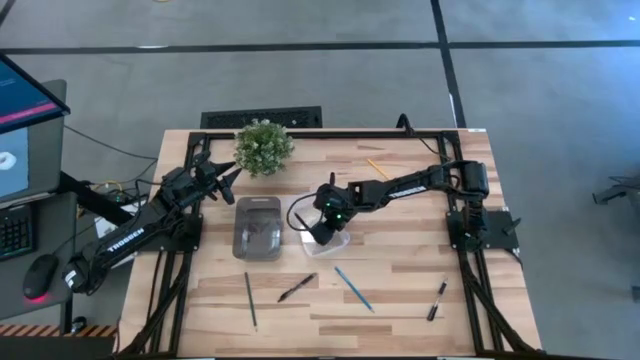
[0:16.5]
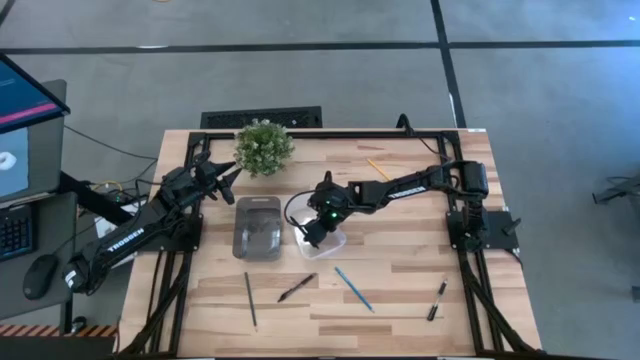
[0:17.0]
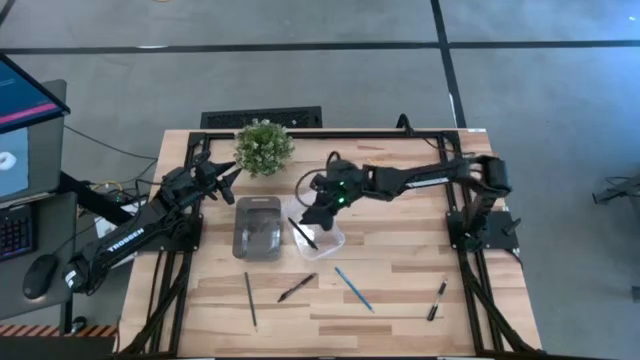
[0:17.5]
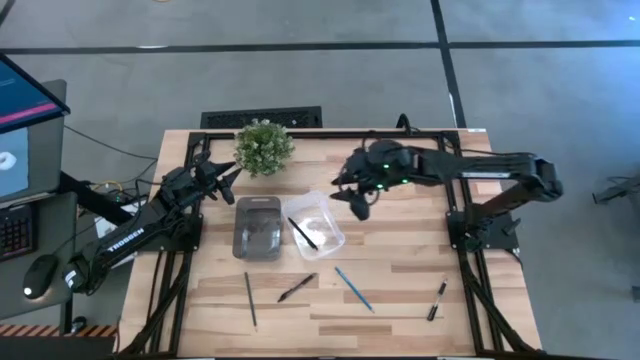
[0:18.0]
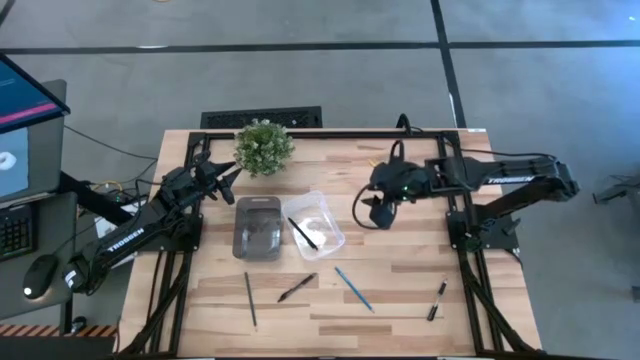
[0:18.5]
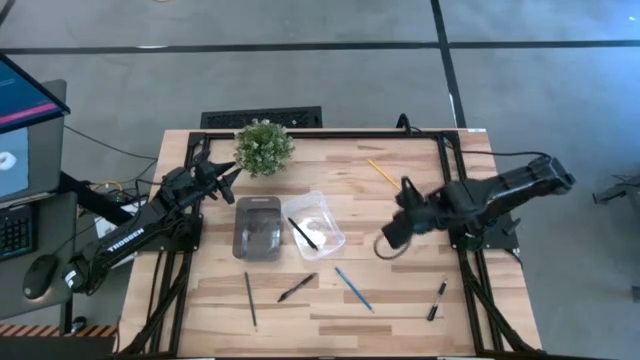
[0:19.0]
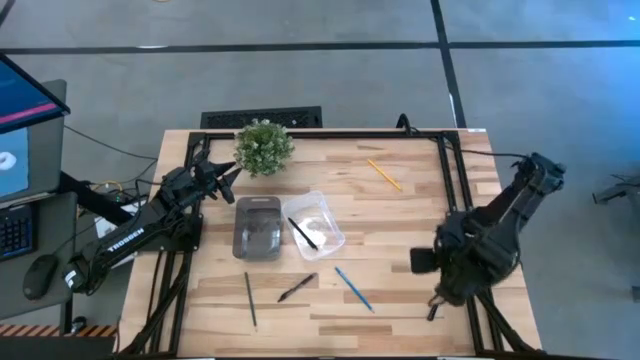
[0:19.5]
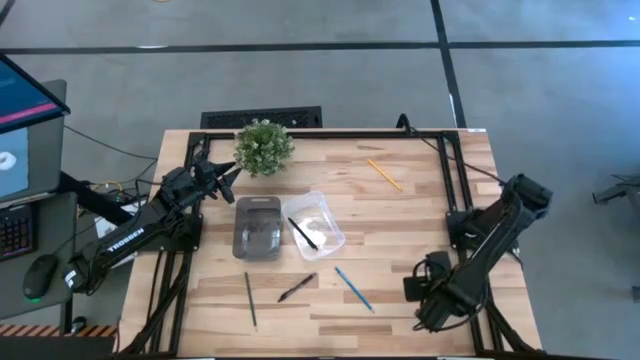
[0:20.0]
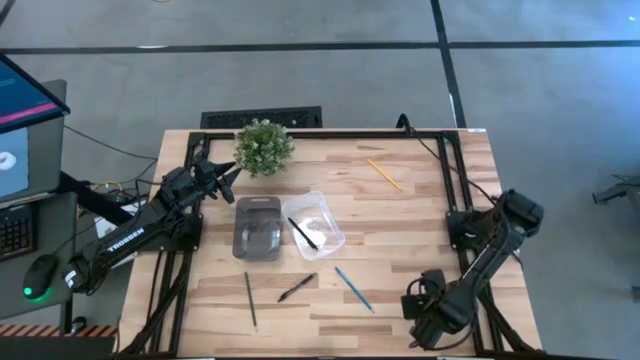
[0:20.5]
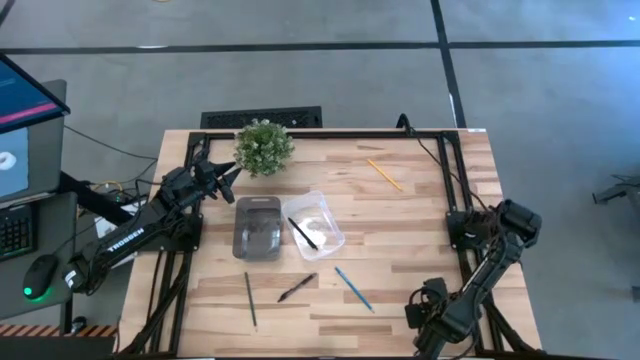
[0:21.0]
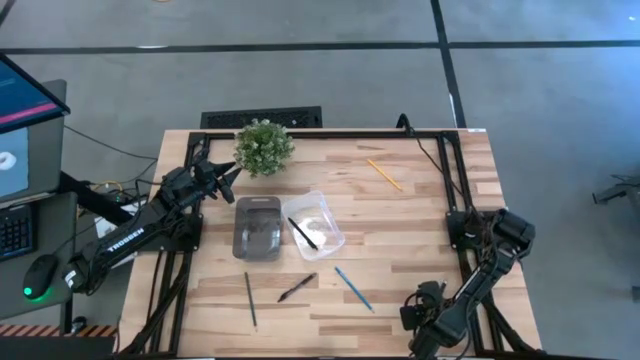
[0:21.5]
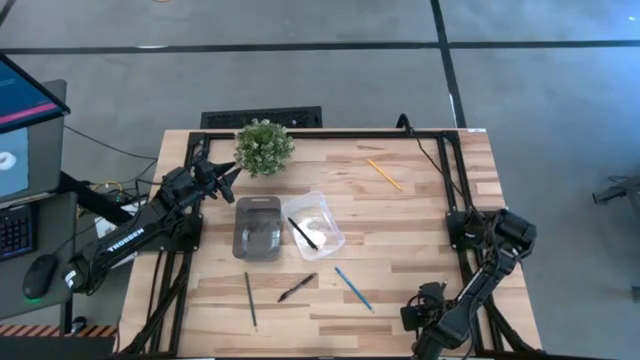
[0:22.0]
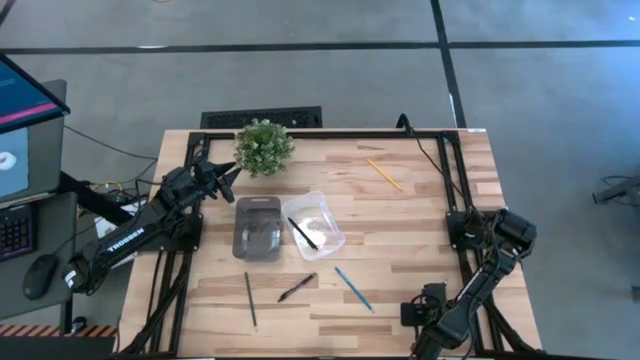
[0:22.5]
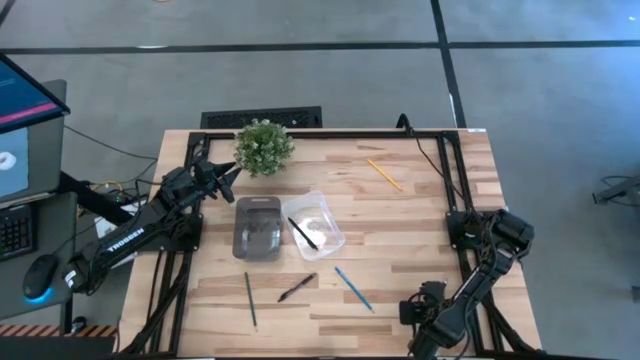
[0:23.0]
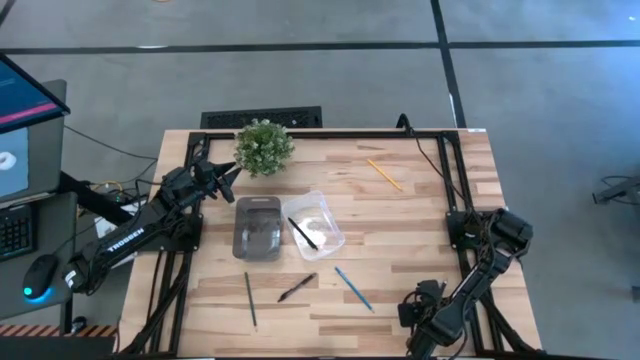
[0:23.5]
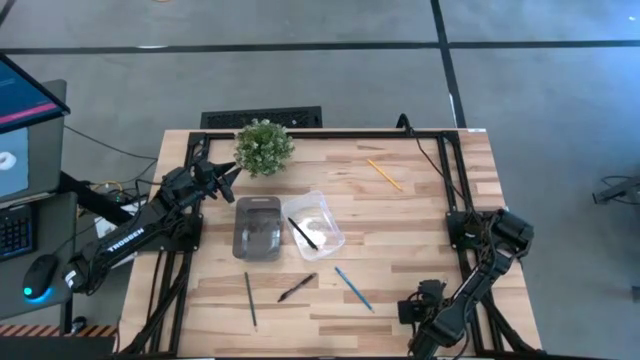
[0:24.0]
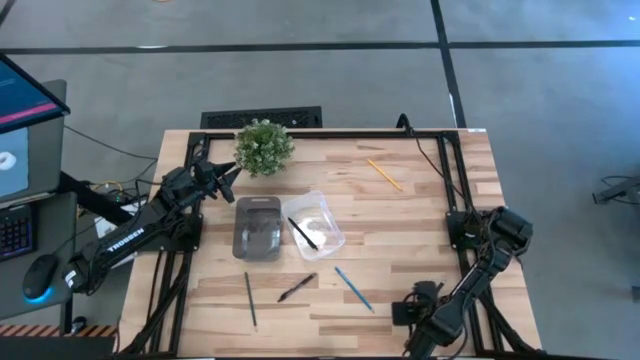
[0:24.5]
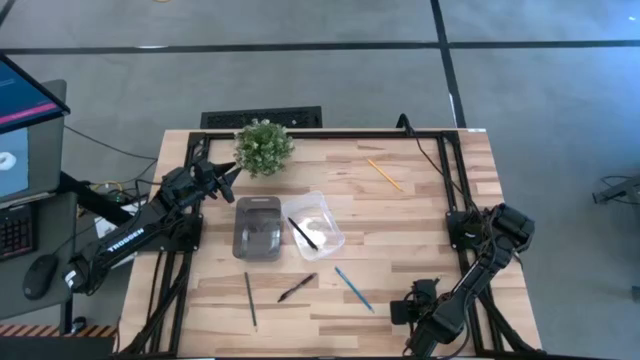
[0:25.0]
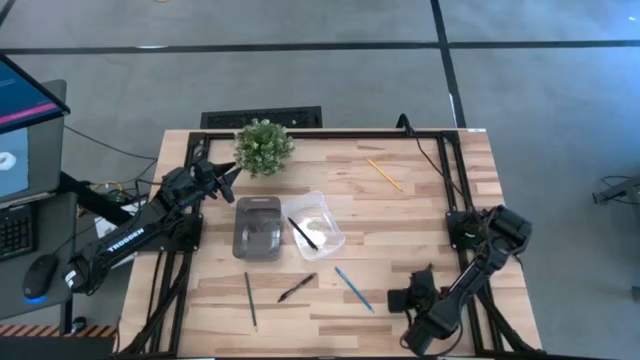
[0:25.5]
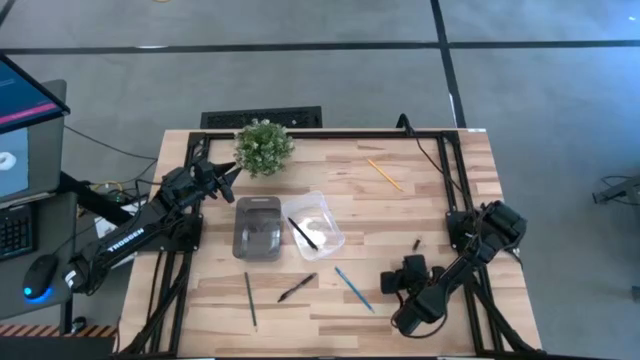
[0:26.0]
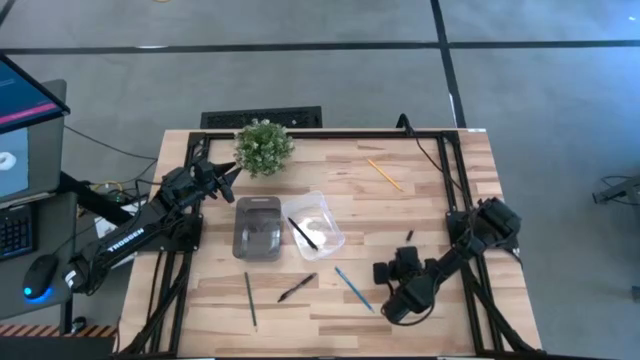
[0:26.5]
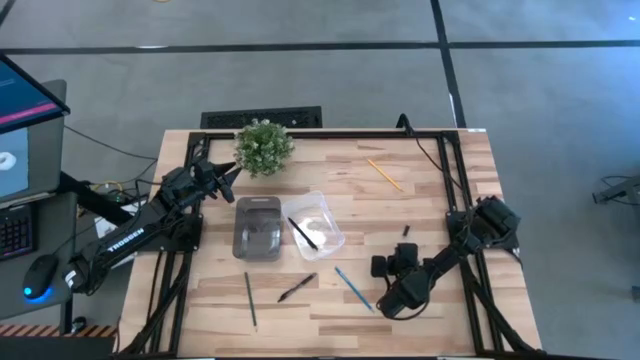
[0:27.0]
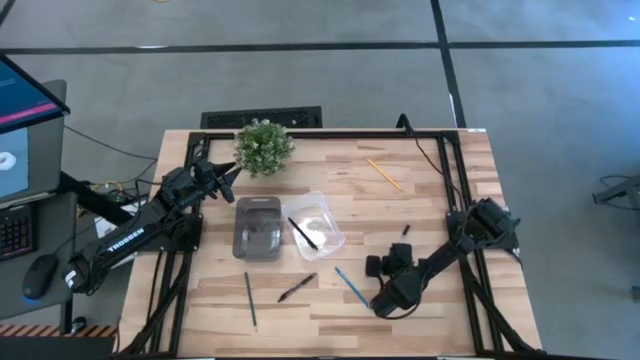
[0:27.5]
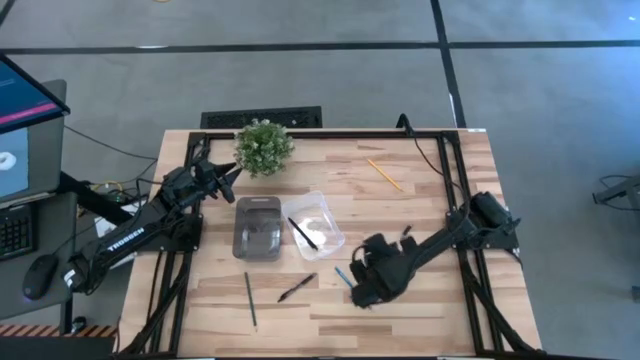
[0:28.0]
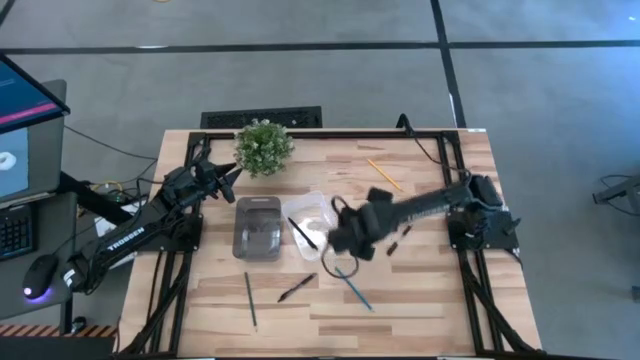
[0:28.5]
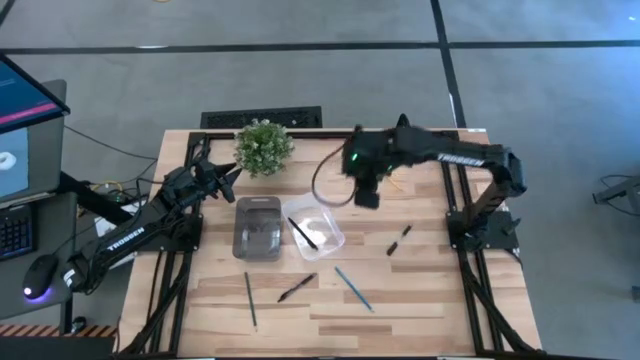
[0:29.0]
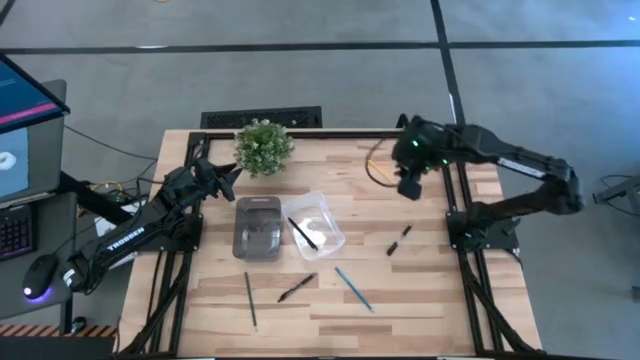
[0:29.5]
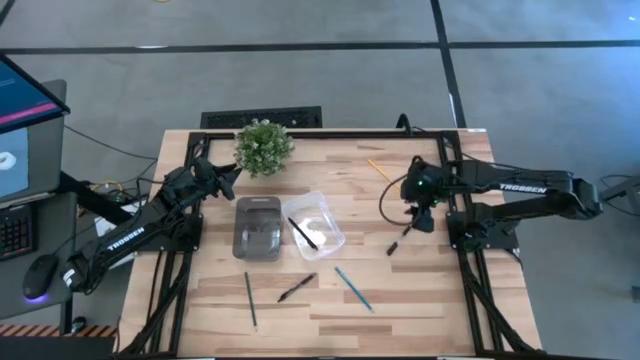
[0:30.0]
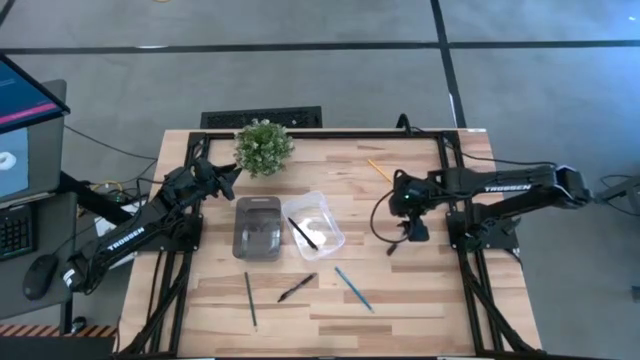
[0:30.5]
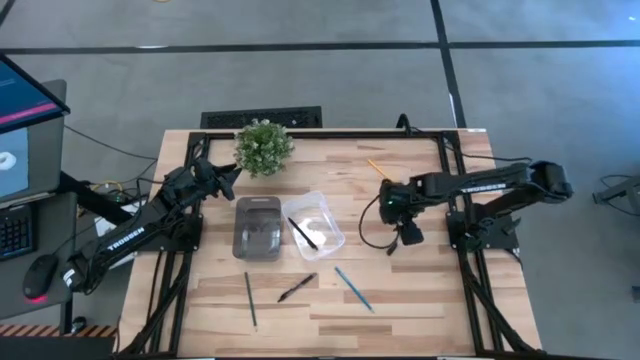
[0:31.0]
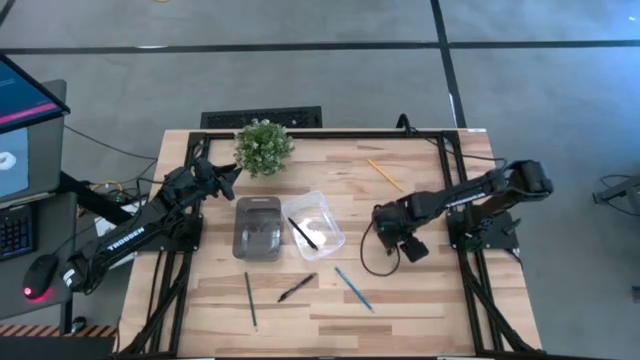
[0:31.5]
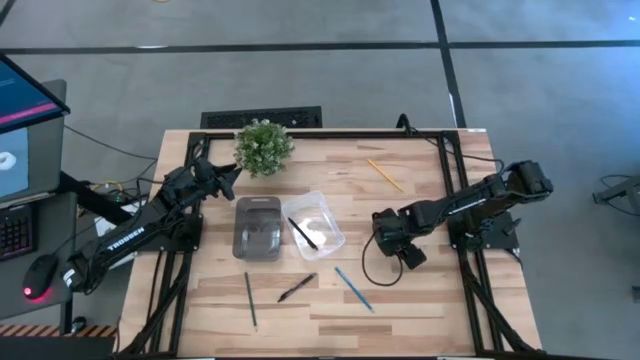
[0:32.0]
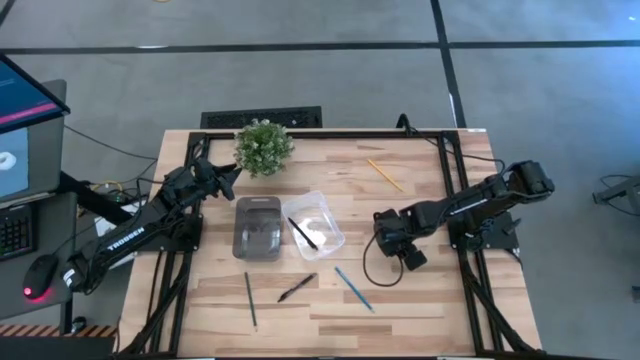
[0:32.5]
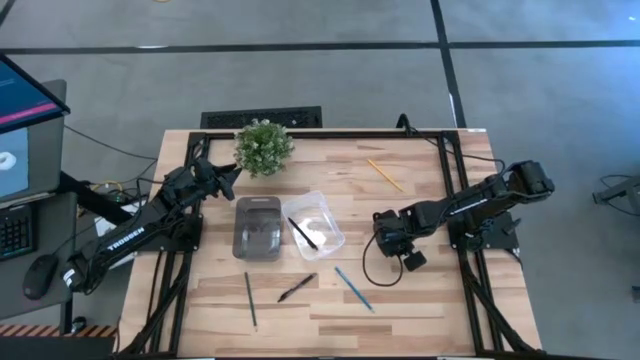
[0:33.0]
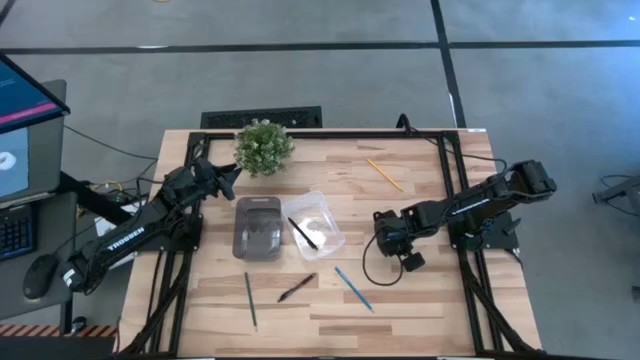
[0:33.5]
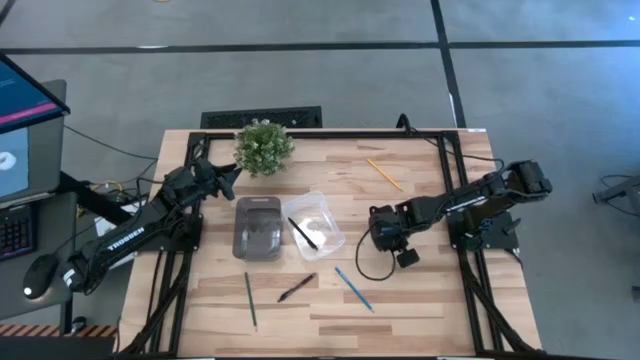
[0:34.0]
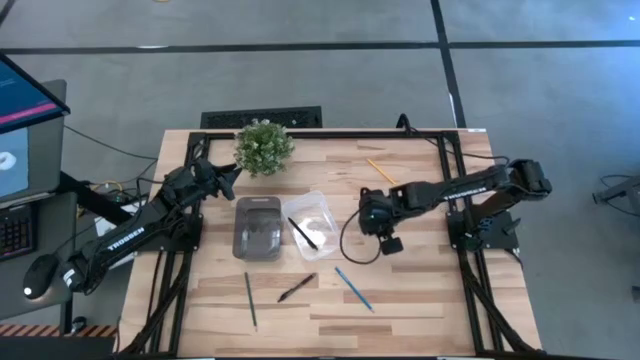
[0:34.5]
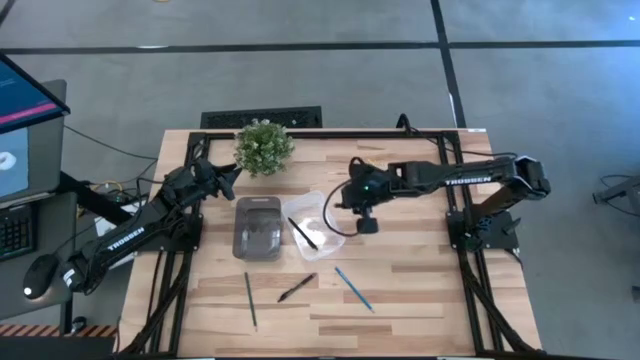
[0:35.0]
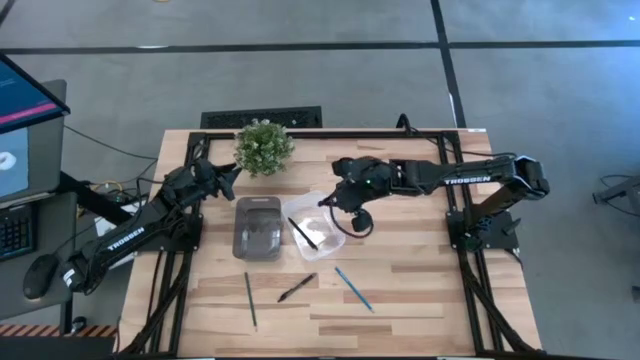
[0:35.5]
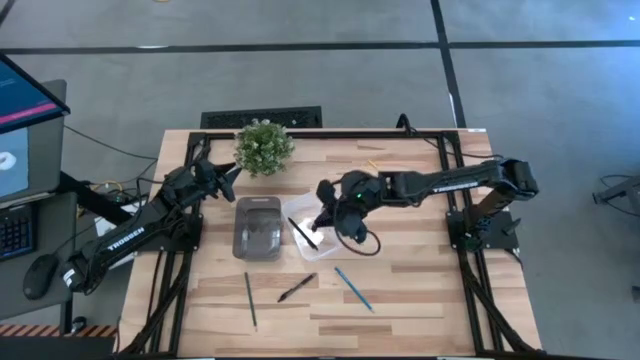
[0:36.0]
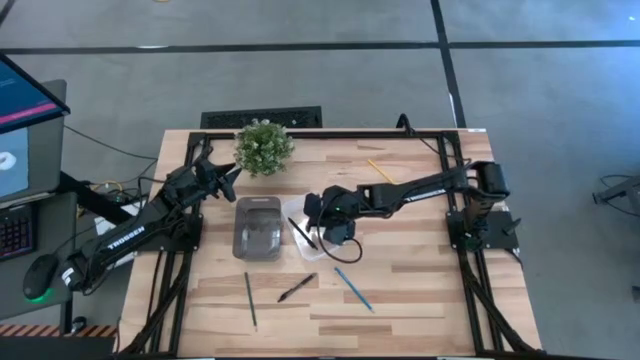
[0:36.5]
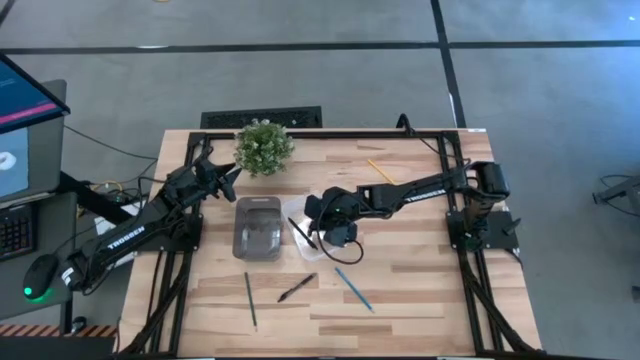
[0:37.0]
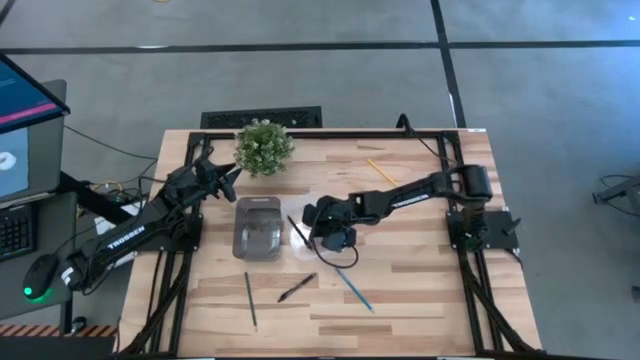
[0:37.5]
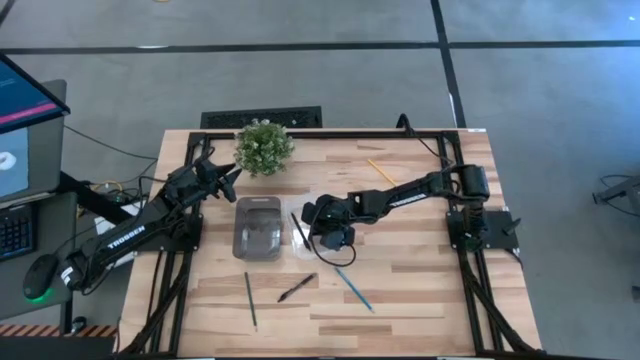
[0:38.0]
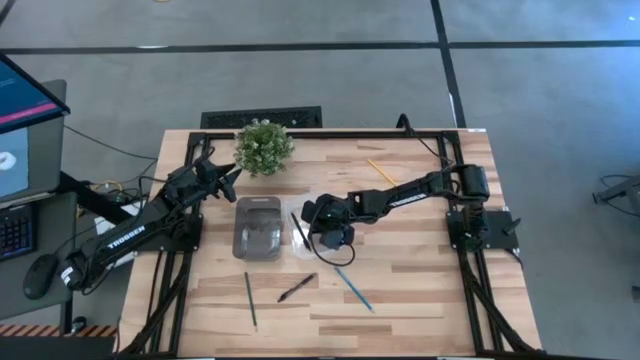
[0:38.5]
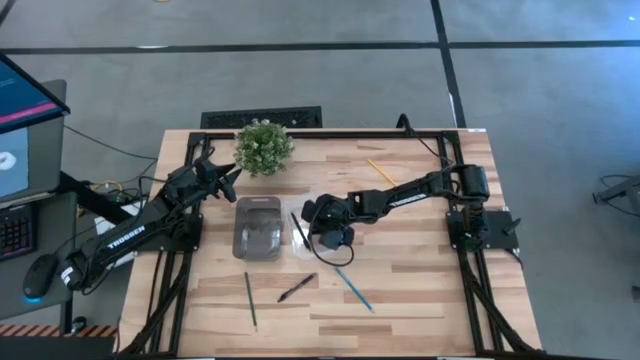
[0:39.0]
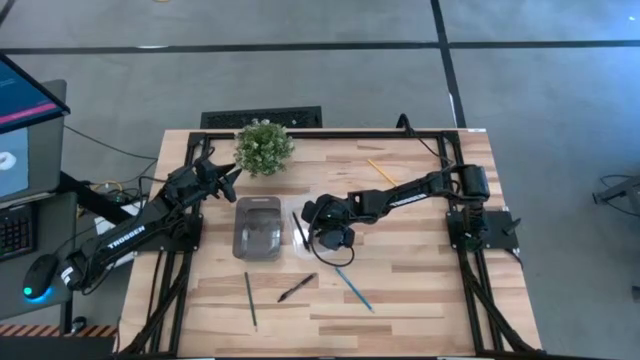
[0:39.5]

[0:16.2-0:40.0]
Task: Sort pens & pencils
Put the right black pen into the transparent bin
